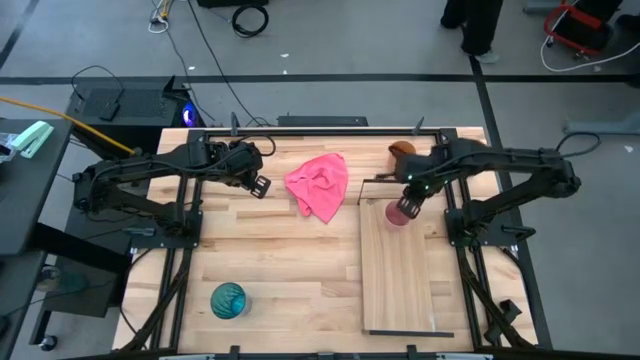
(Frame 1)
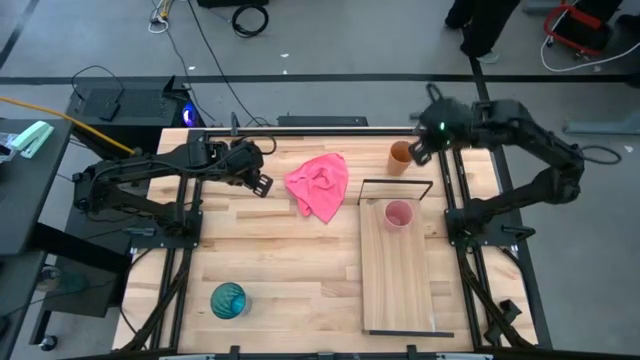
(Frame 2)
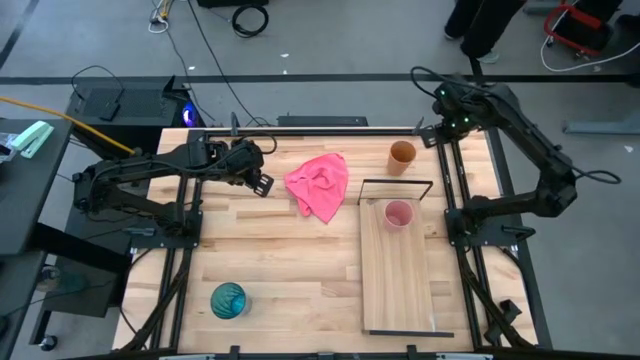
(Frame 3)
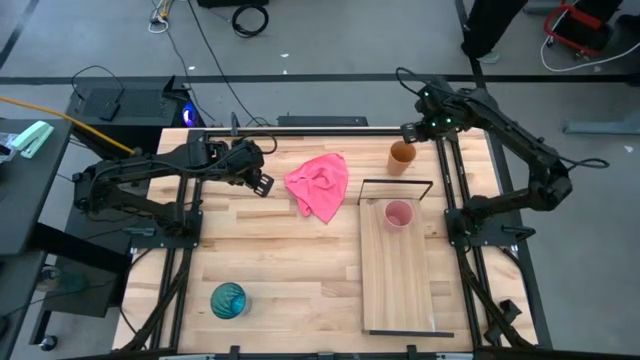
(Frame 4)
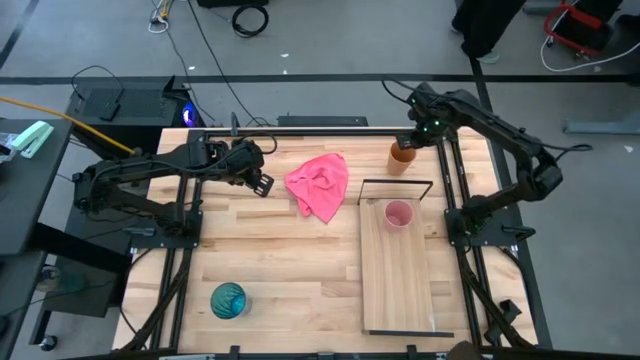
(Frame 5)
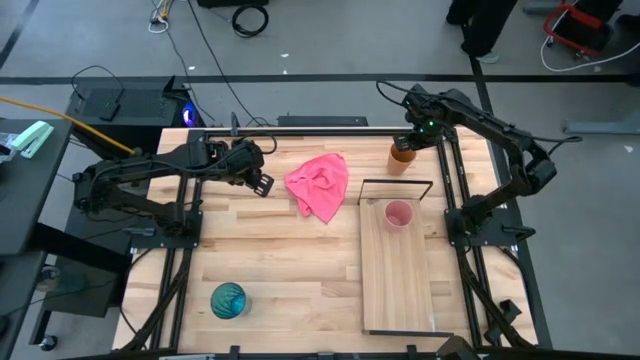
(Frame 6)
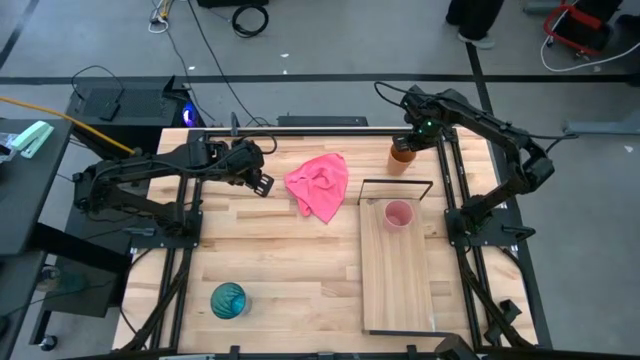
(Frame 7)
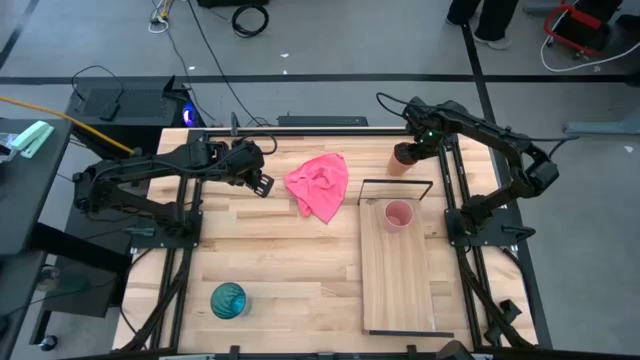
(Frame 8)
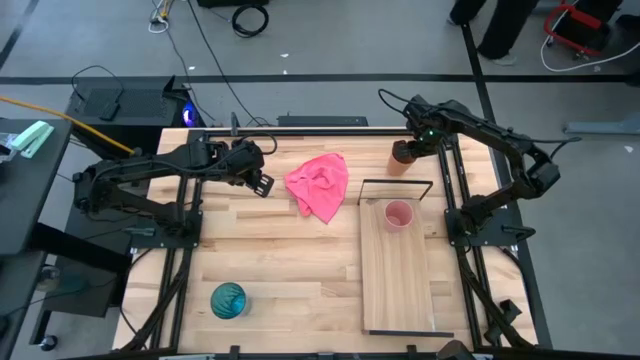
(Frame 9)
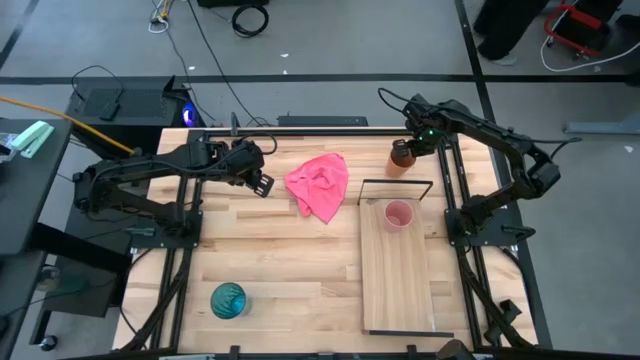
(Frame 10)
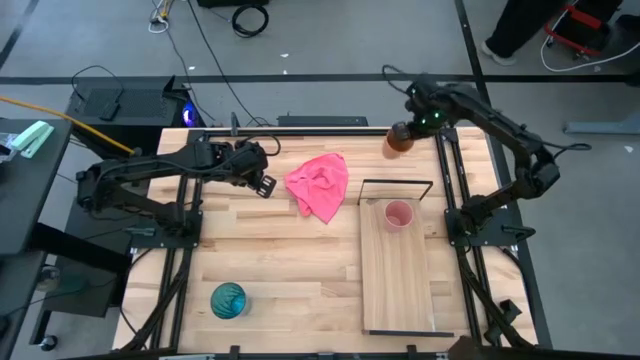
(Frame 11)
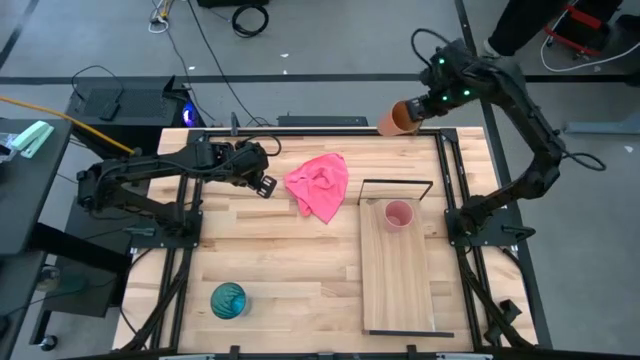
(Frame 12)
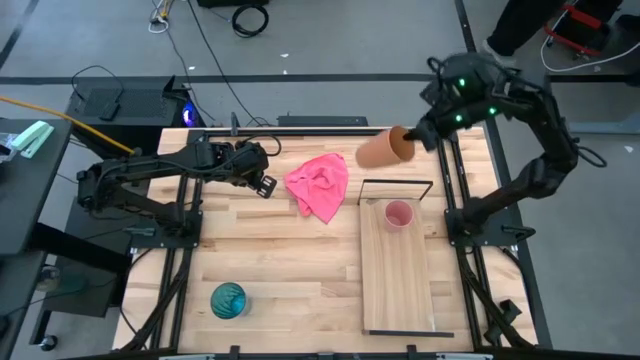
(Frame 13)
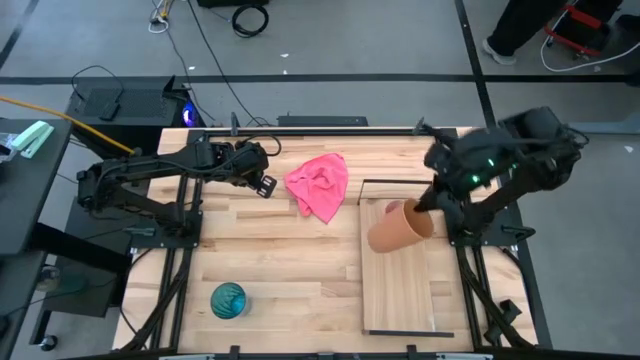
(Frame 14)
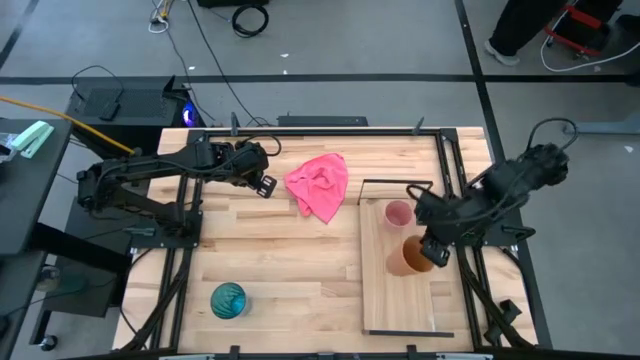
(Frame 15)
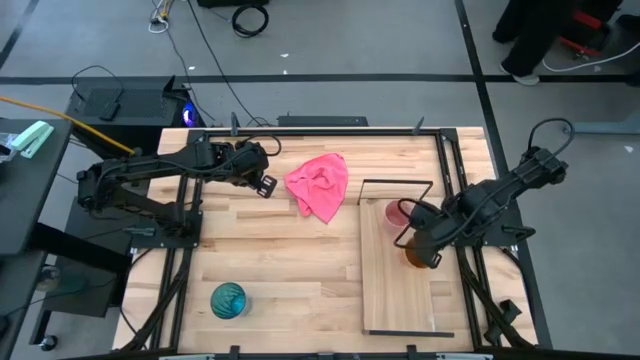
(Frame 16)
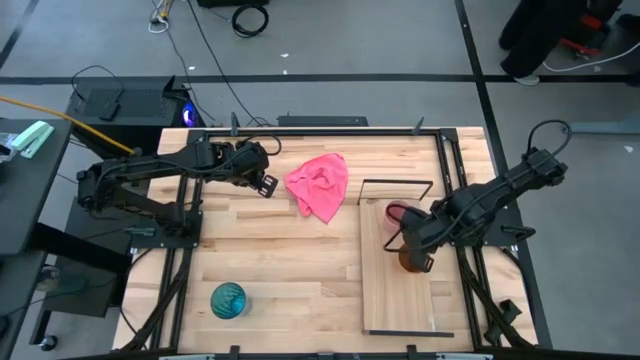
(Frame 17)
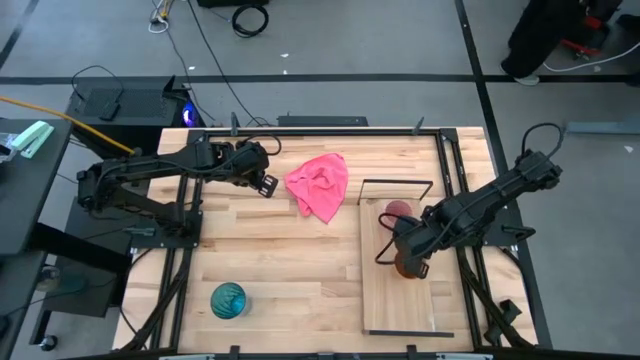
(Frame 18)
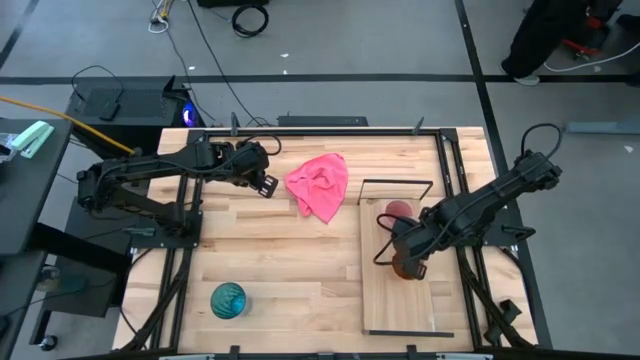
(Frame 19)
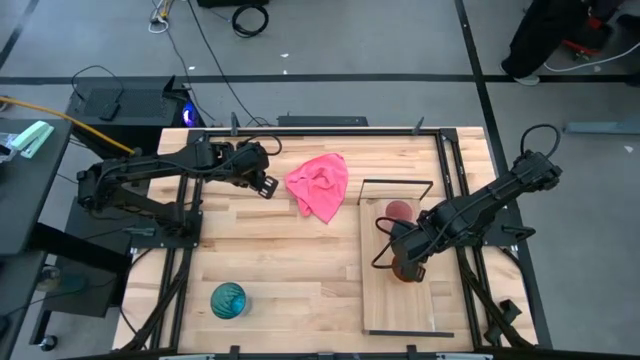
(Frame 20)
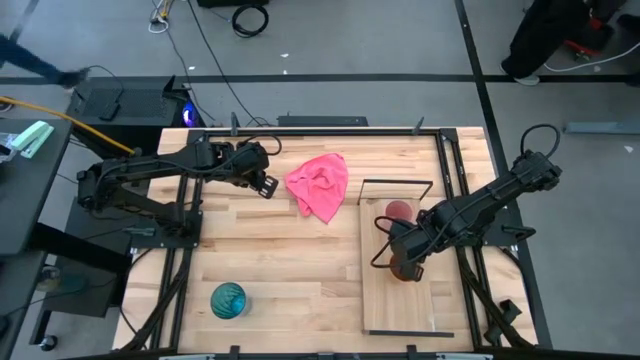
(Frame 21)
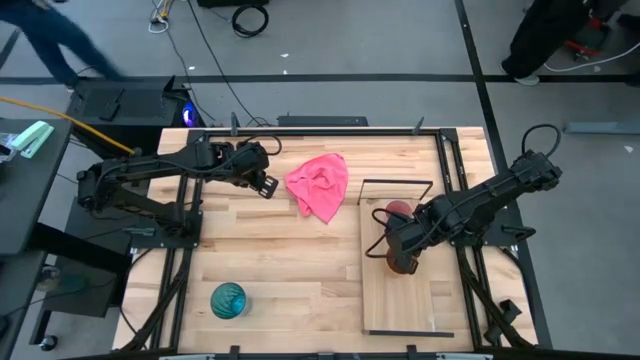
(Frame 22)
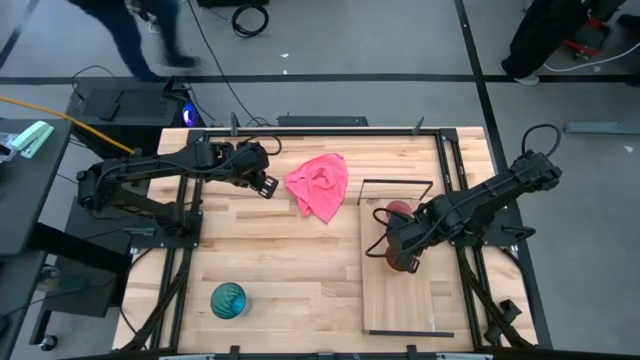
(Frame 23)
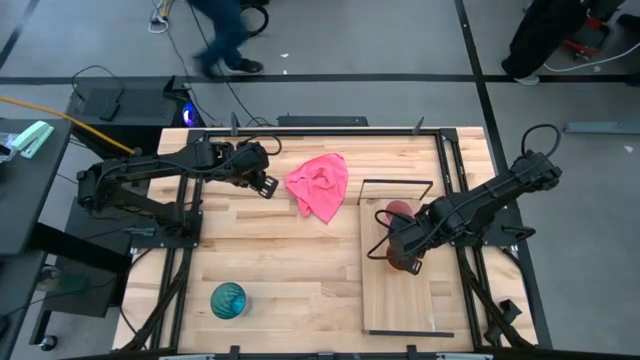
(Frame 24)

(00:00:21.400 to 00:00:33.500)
Task: Stack small to large cups/mugs on shelf
Put the orange plastic glass on the shelf

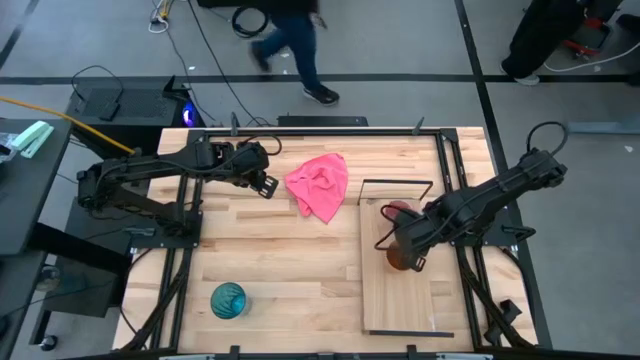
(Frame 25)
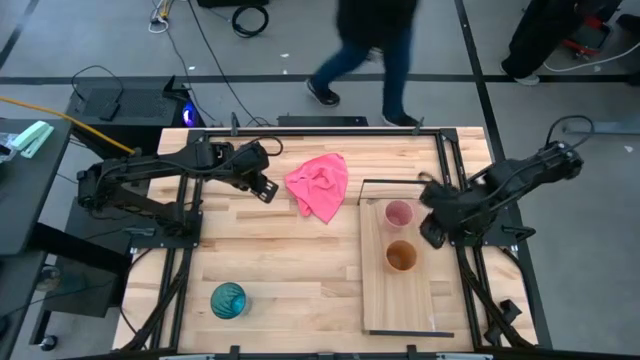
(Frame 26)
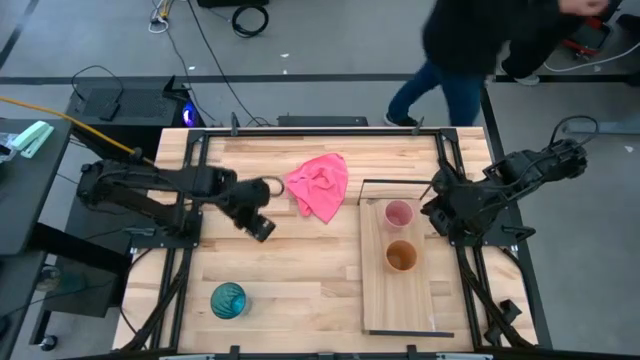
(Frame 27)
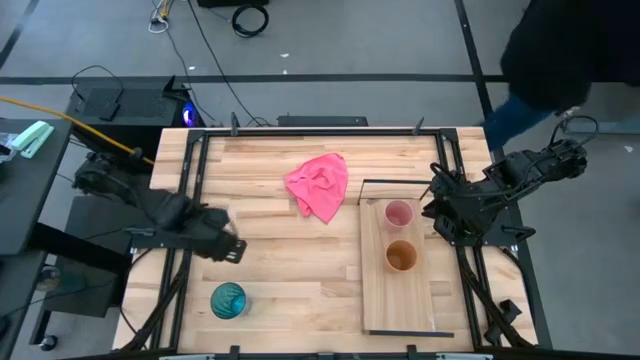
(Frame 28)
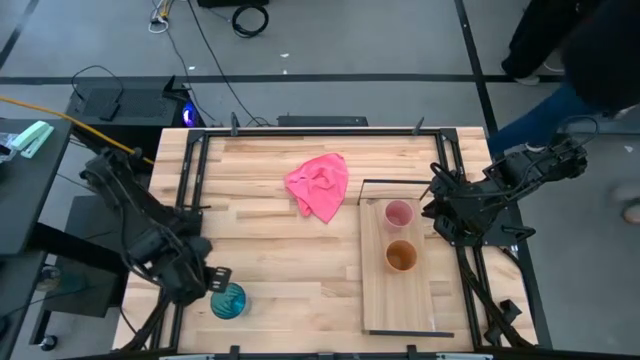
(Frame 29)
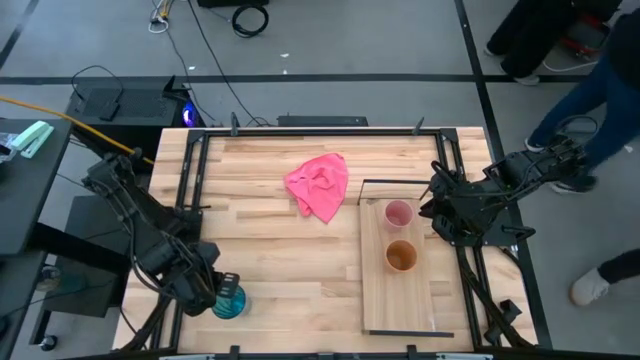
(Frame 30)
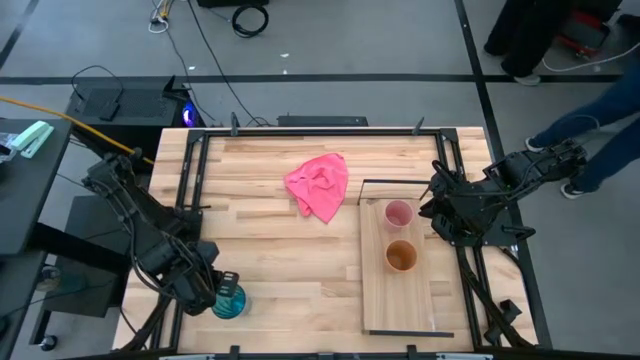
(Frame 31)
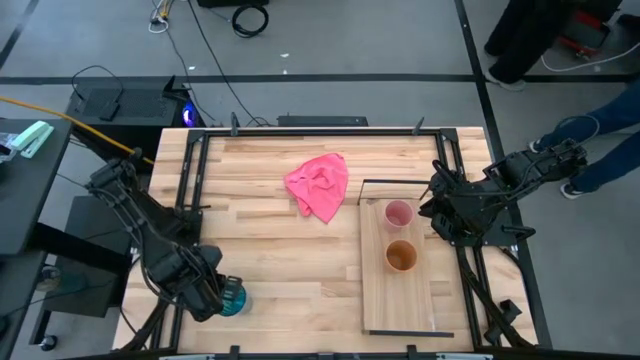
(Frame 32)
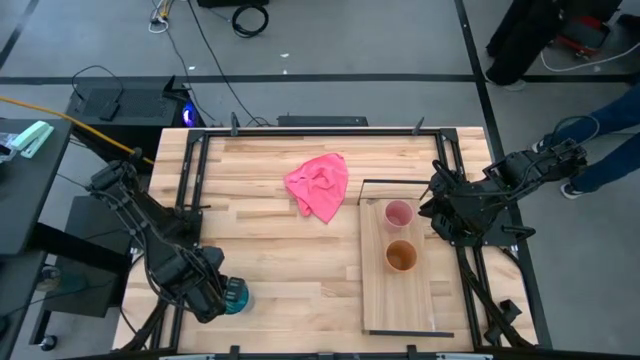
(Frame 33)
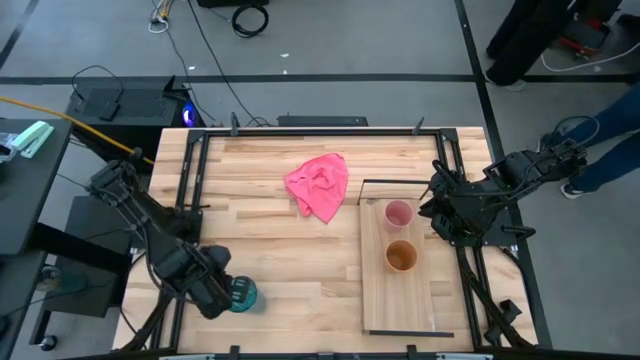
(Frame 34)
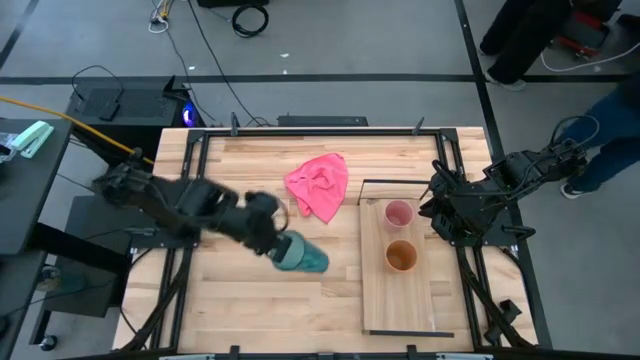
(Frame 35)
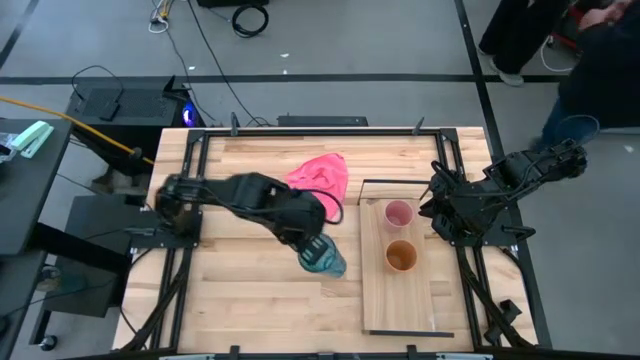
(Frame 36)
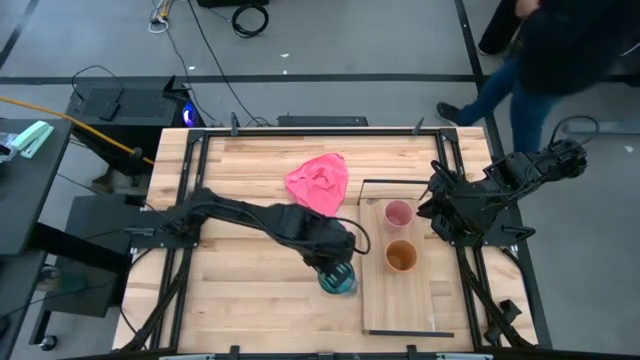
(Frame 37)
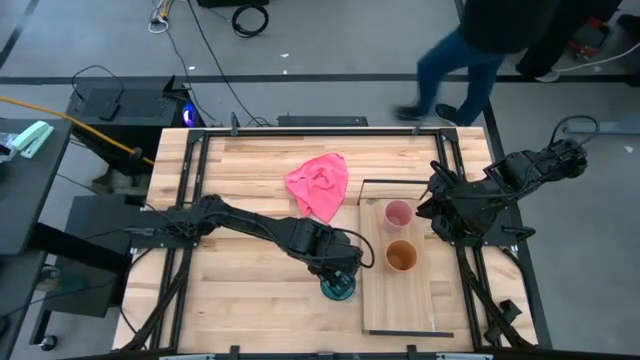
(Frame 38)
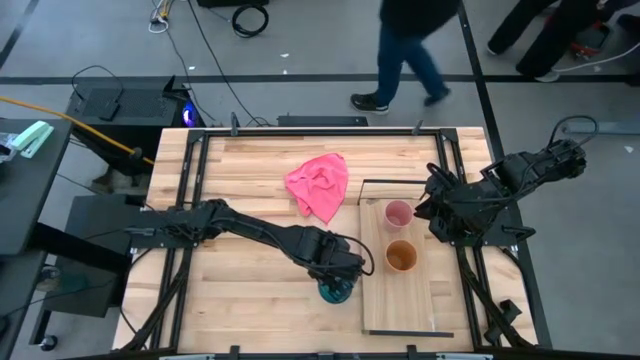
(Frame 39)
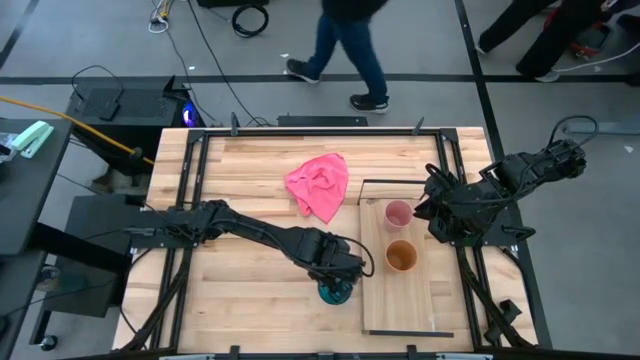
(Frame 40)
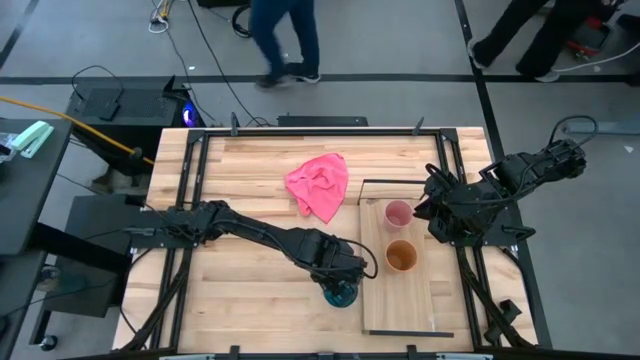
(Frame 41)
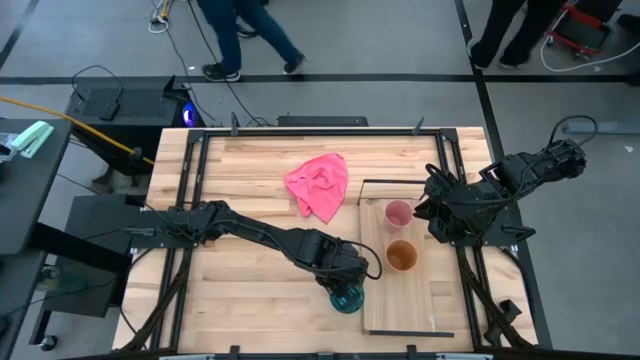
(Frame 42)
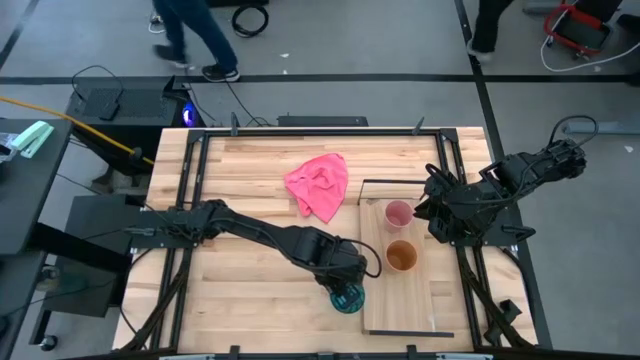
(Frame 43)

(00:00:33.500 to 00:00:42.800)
Move the blue plastic glass from the bottom left to the bottom center of the table
